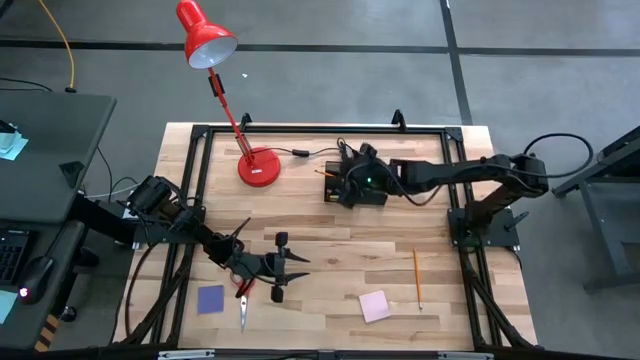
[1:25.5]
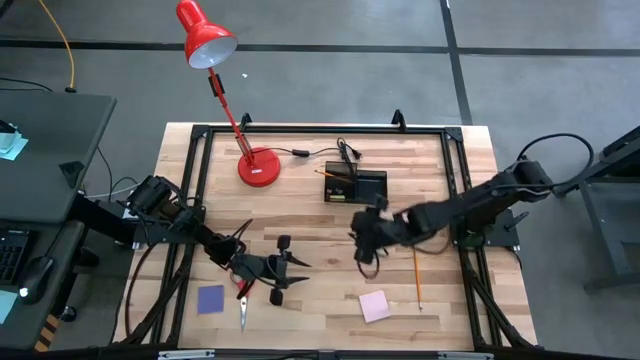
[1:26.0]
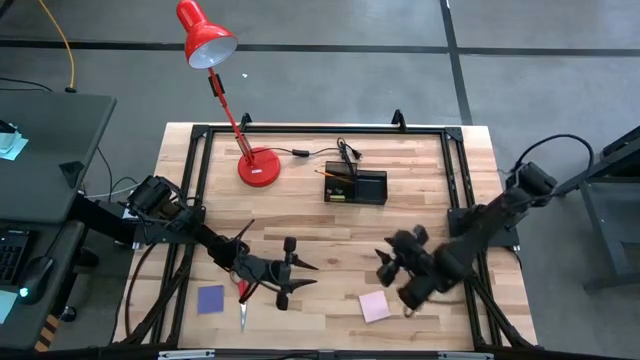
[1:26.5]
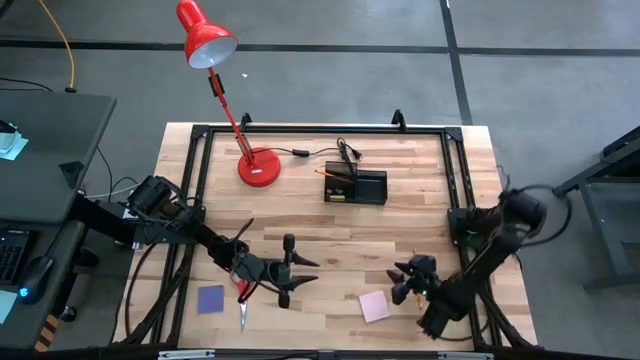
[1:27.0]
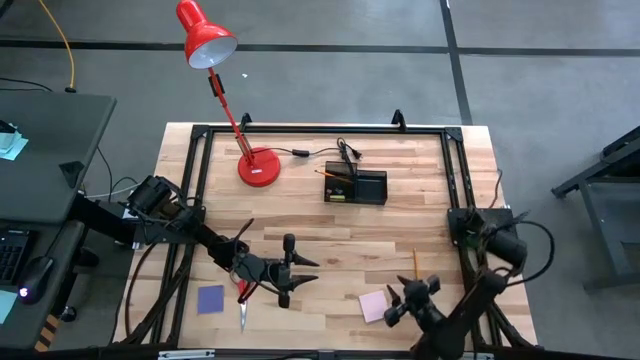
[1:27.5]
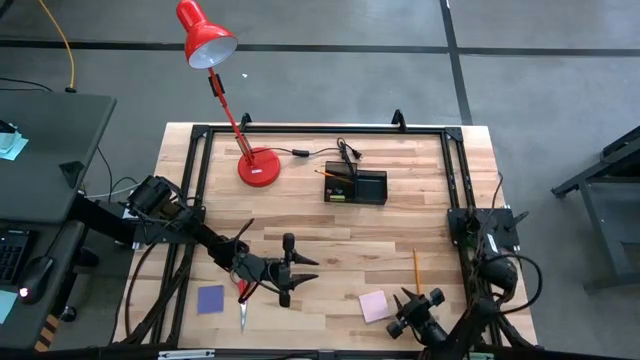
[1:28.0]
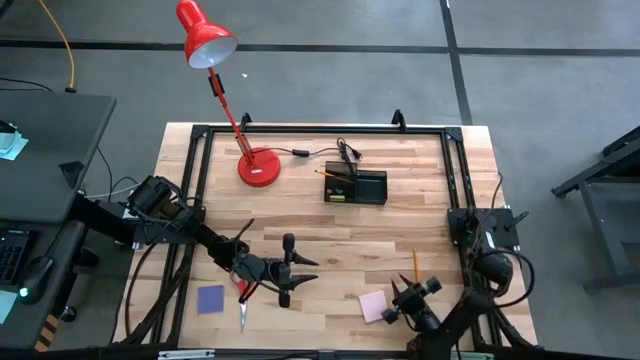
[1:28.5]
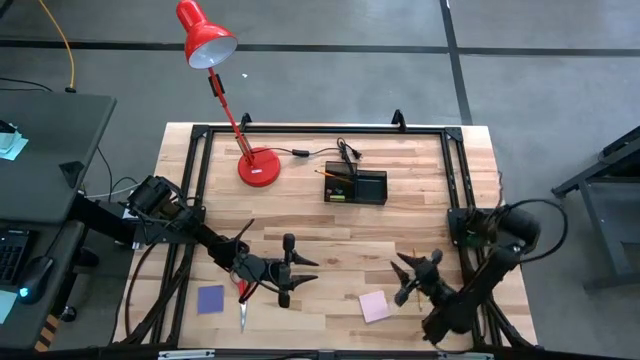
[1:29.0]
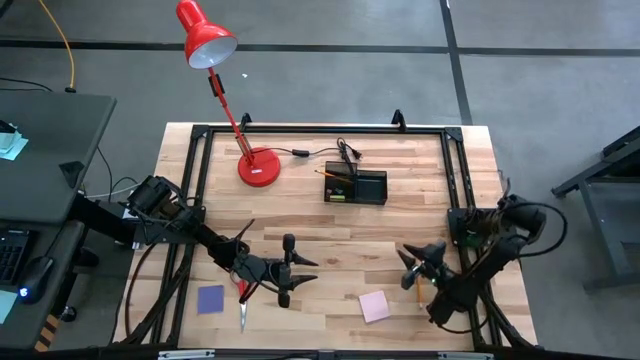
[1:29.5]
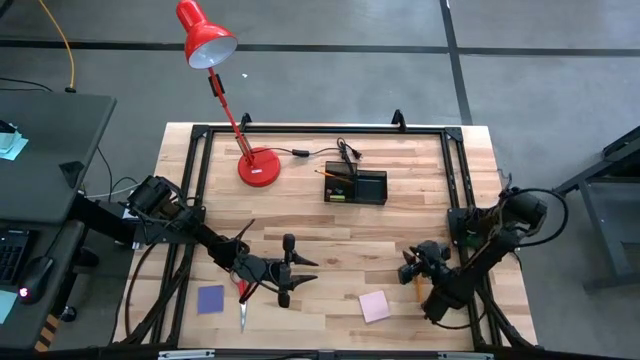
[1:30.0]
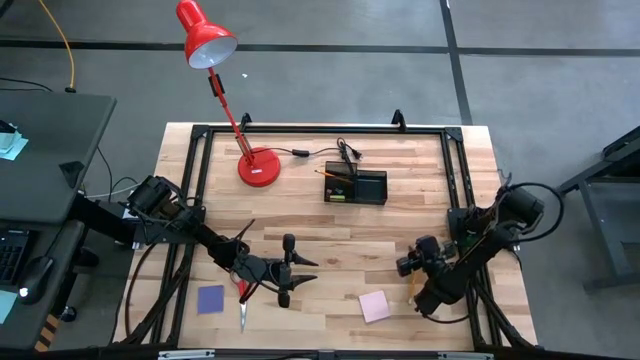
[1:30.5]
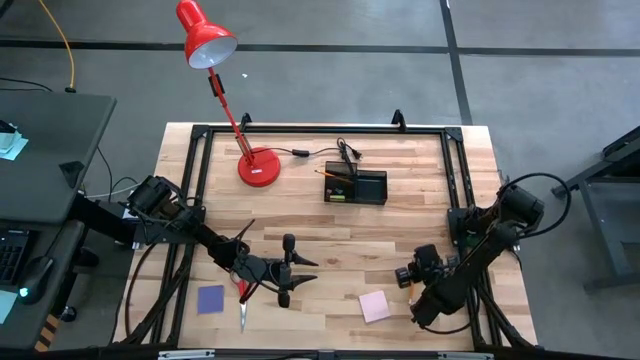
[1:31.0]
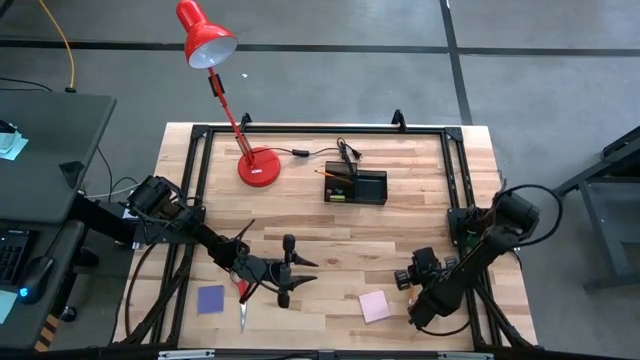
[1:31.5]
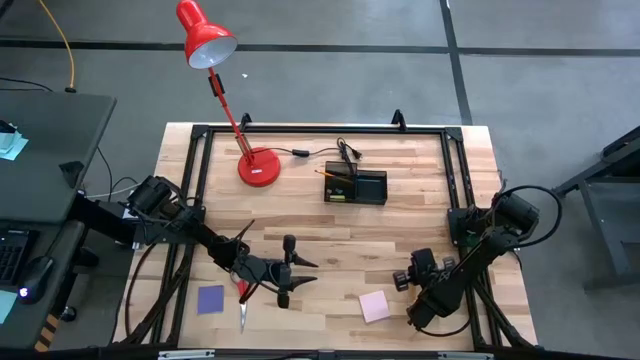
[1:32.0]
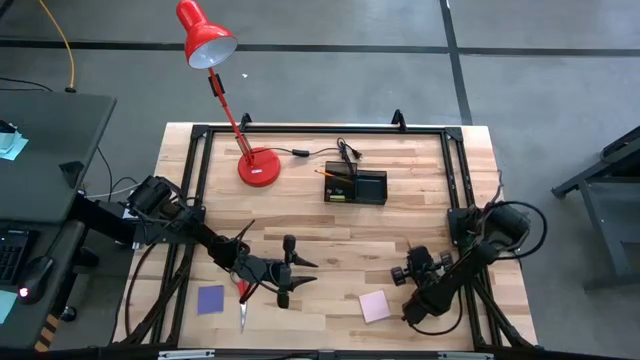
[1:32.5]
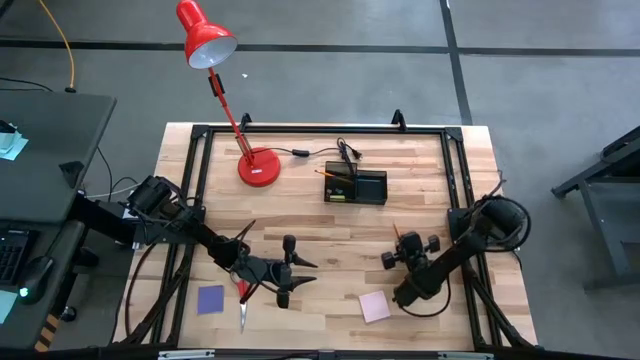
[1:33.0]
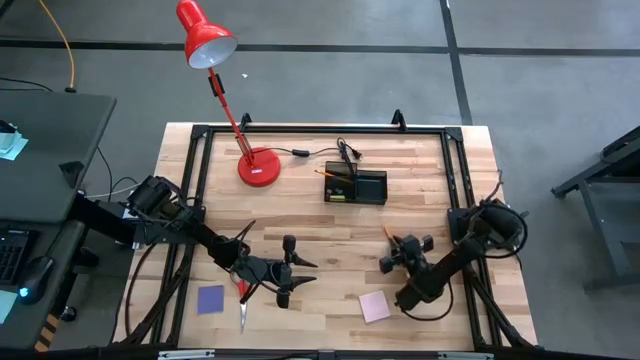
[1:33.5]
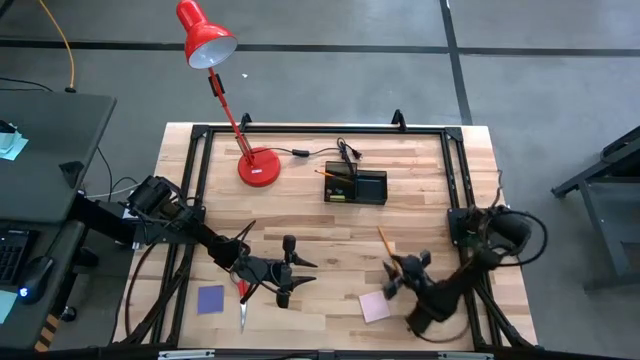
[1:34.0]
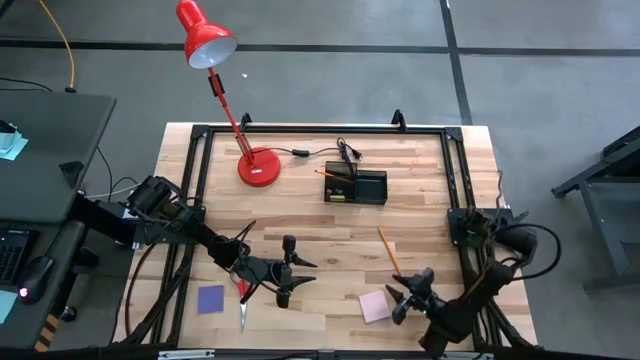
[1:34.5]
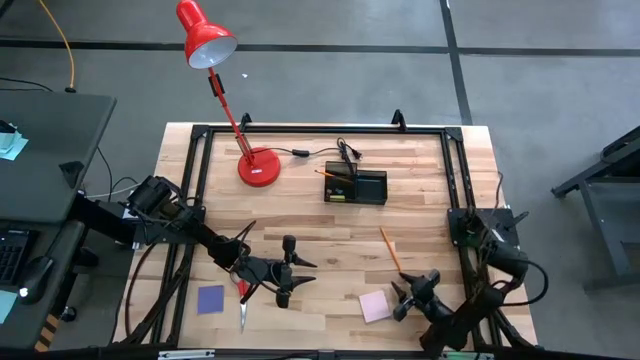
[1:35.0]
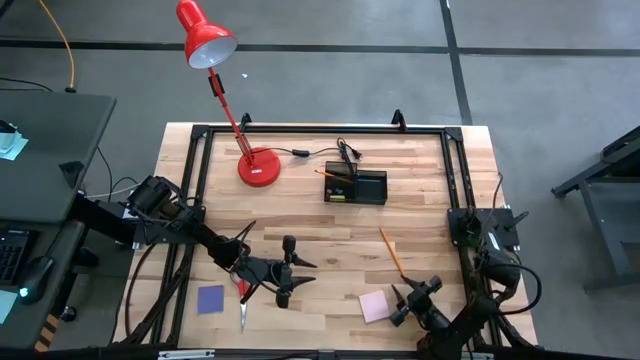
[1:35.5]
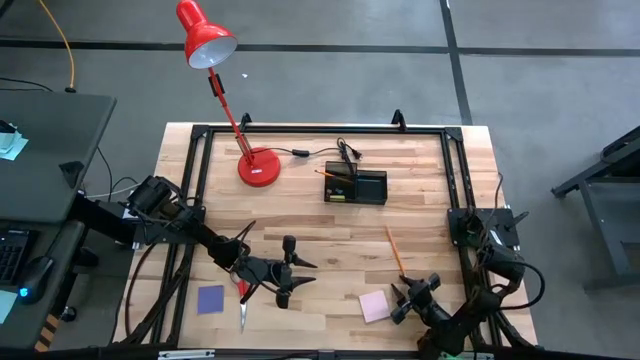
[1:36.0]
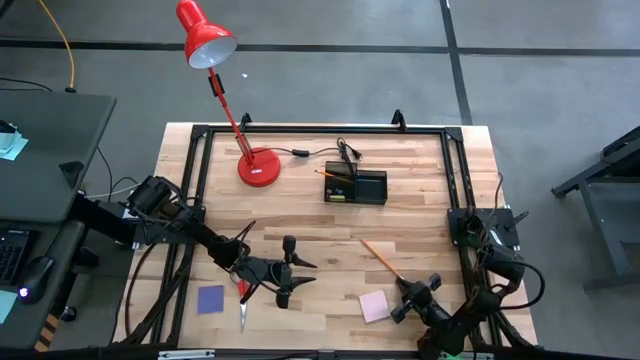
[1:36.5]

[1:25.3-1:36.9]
Task: Pick and place office supplies into organizer
Put the orange pencil into the desk organizer

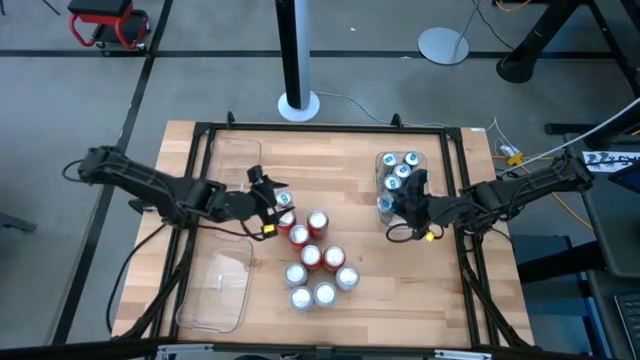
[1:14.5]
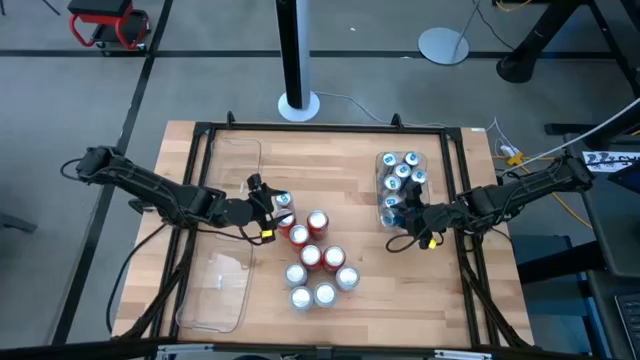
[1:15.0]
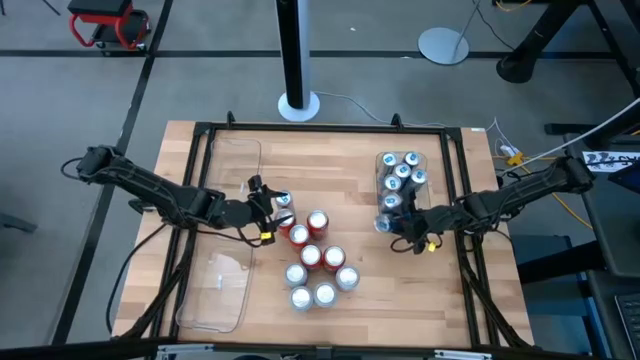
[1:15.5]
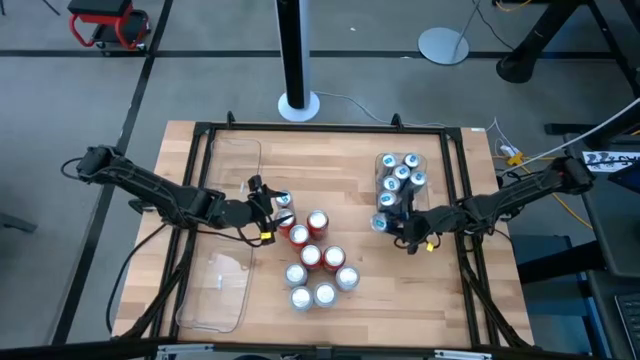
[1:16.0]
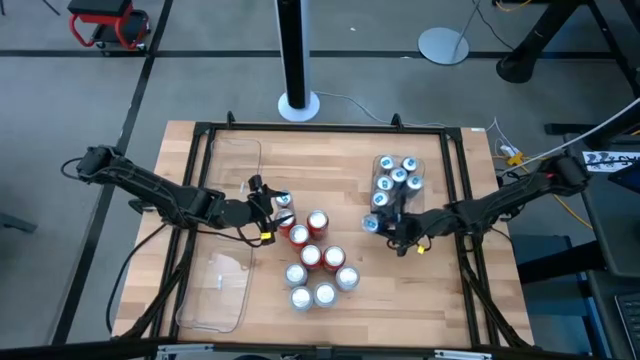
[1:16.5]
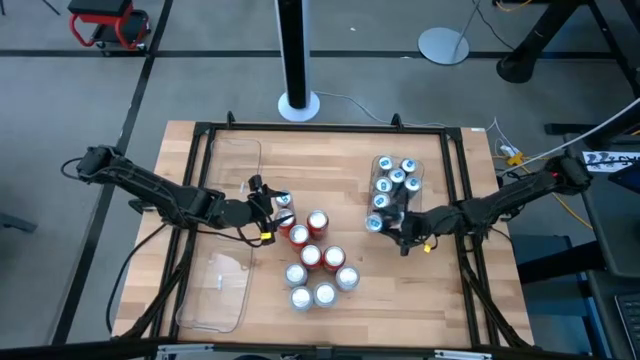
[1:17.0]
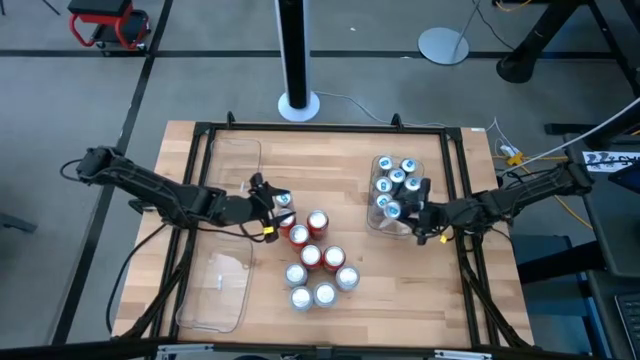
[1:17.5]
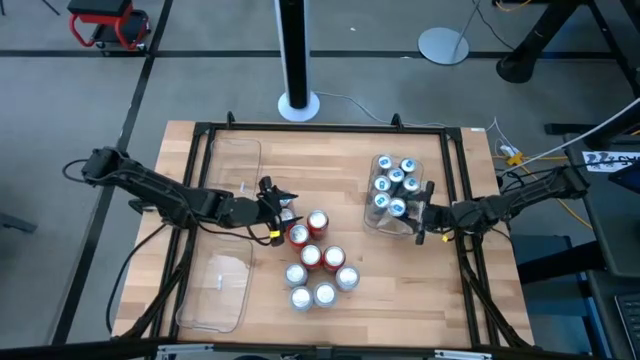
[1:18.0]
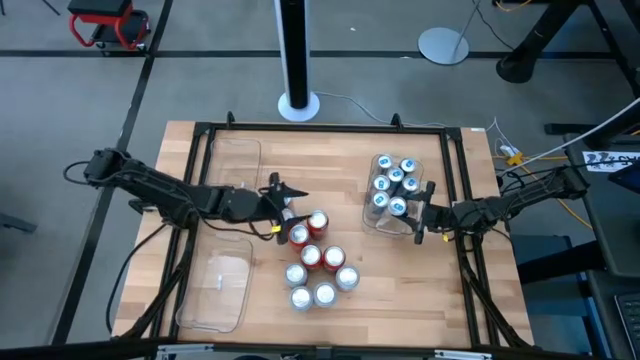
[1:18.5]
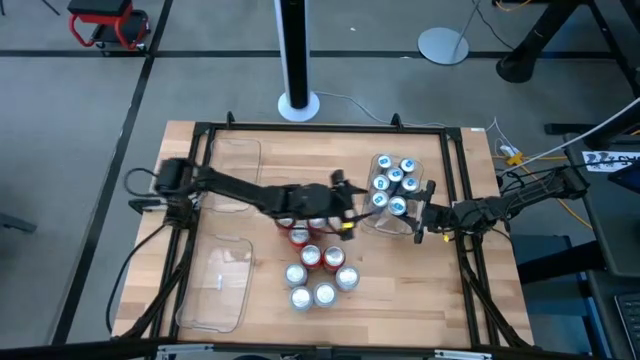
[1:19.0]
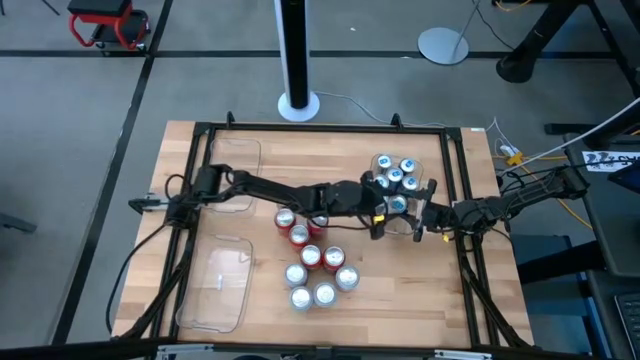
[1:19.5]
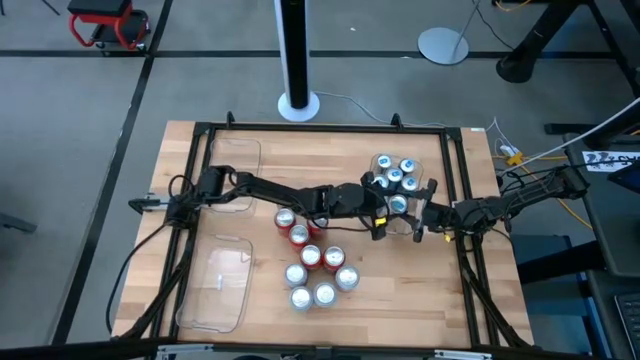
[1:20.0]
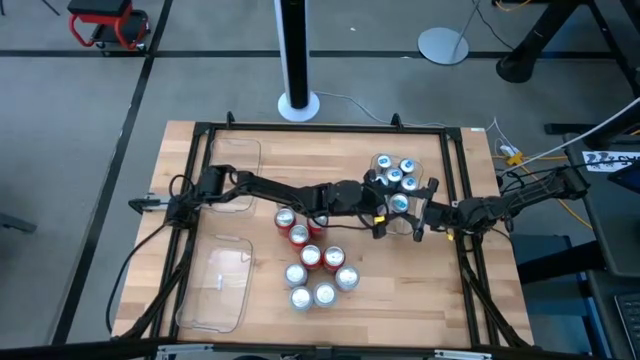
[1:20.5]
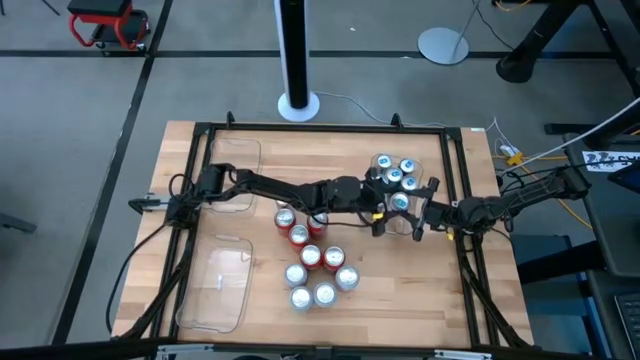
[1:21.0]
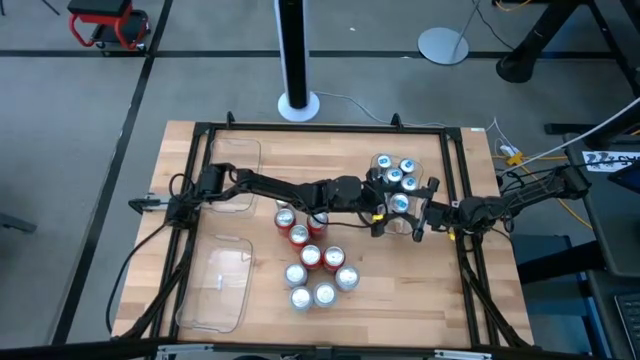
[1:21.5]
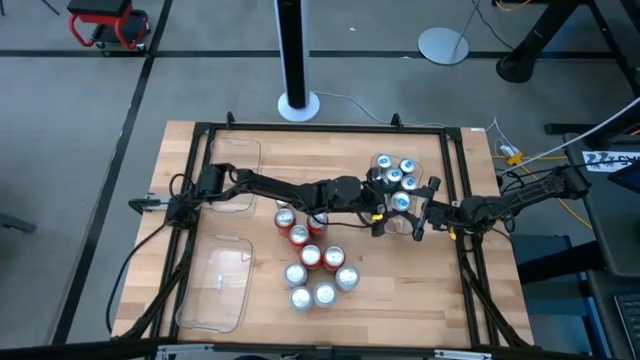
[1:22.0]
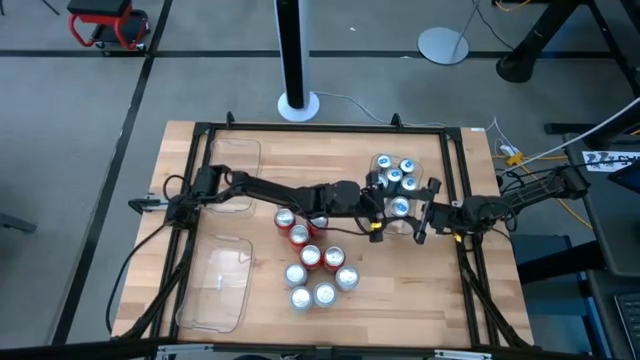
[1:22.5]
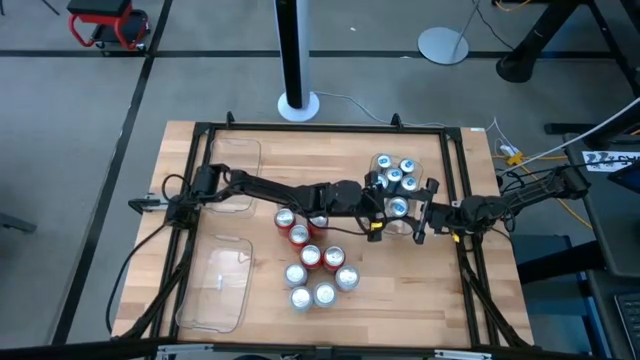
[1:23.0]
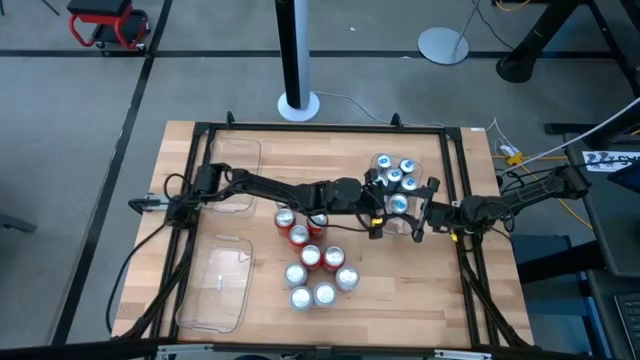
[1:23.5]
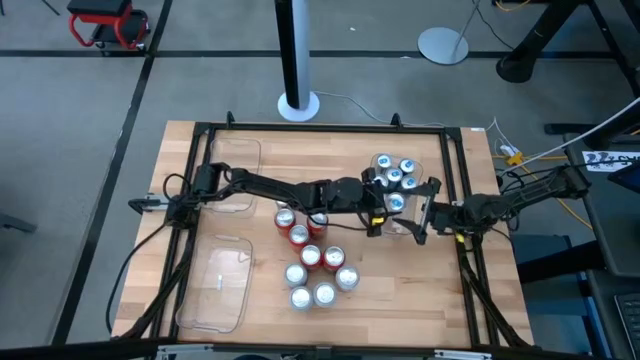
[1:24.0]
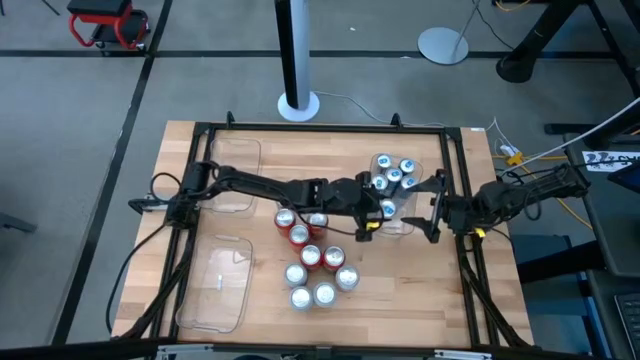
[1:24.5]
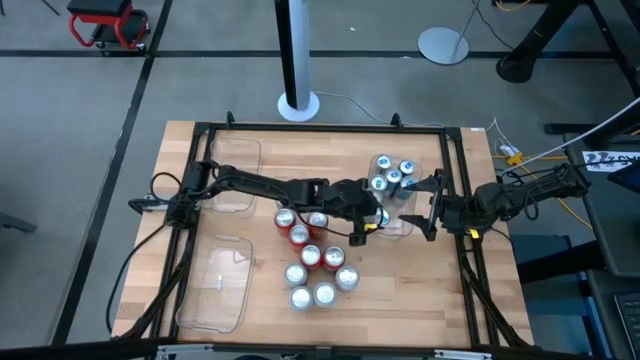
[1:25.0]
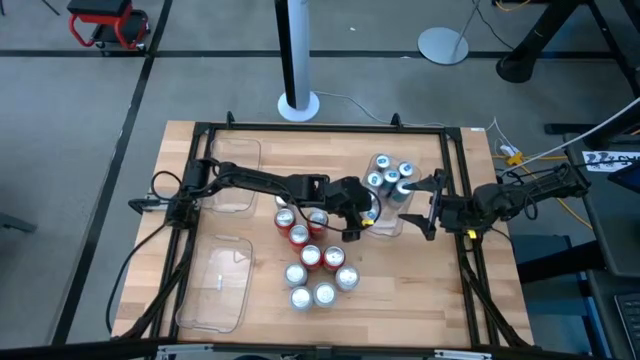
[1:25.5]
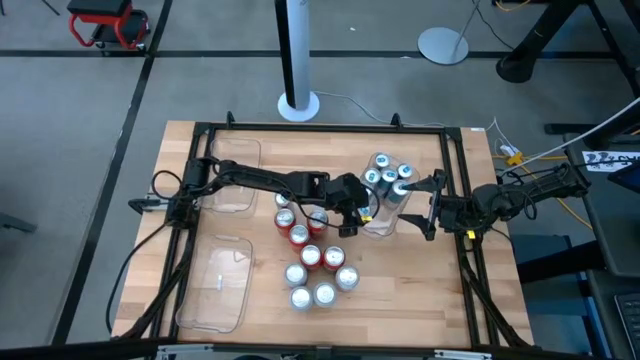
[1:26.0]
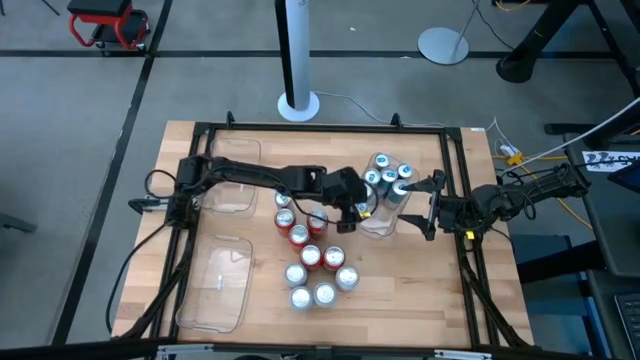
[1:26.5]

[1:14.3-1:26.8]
Task: Sort soda cans
Put the blue soda can in the middle right transparent bin
